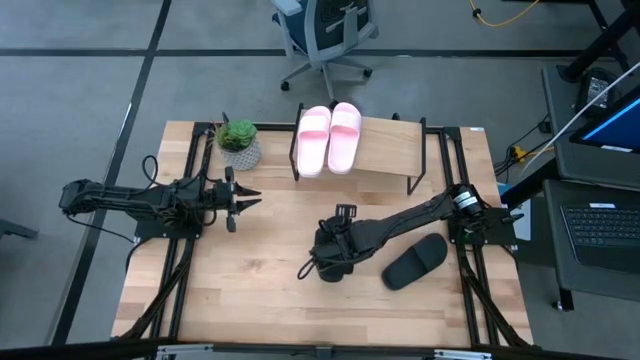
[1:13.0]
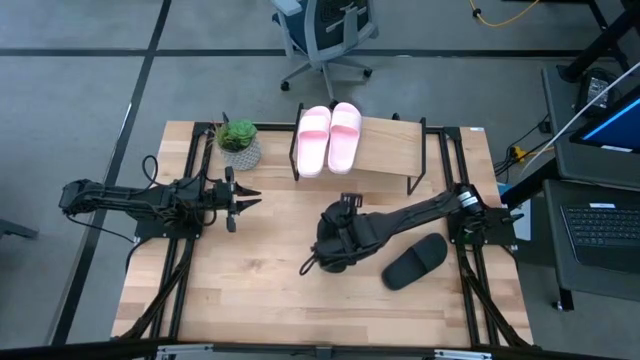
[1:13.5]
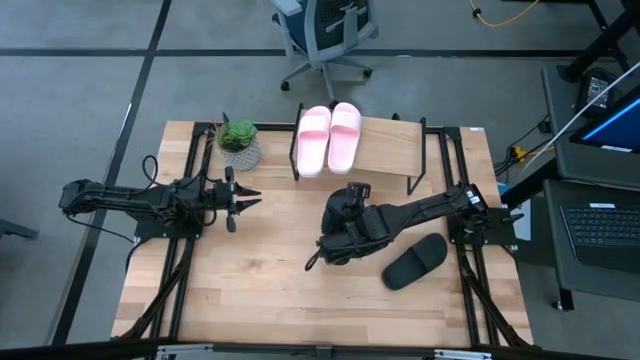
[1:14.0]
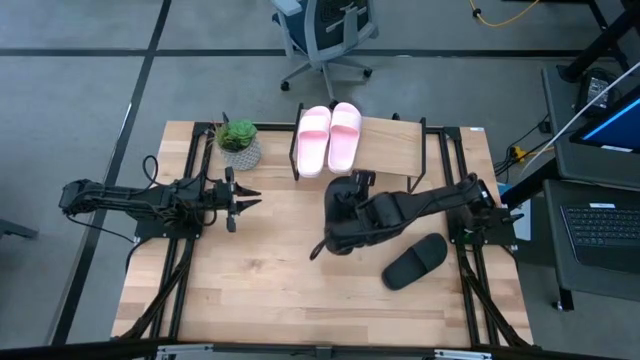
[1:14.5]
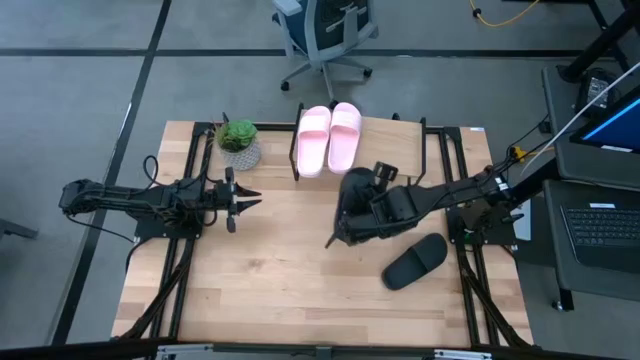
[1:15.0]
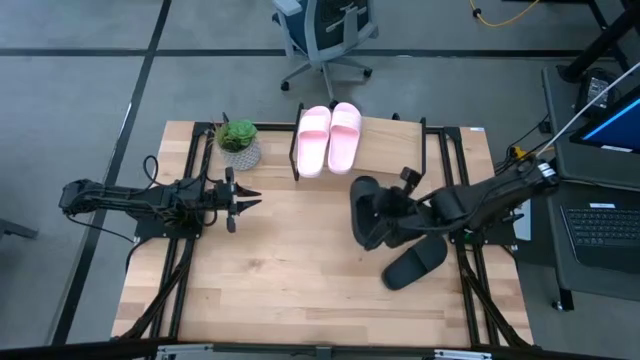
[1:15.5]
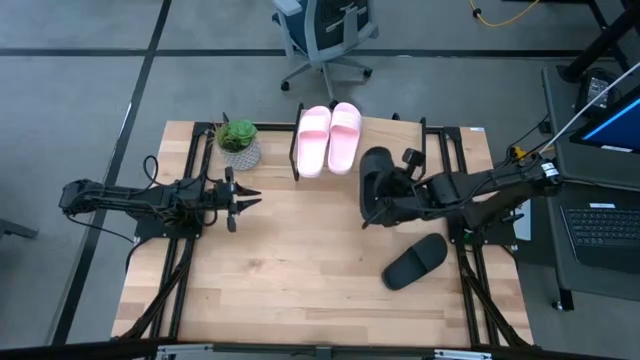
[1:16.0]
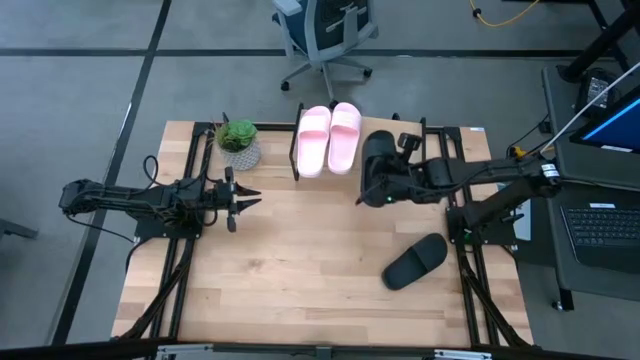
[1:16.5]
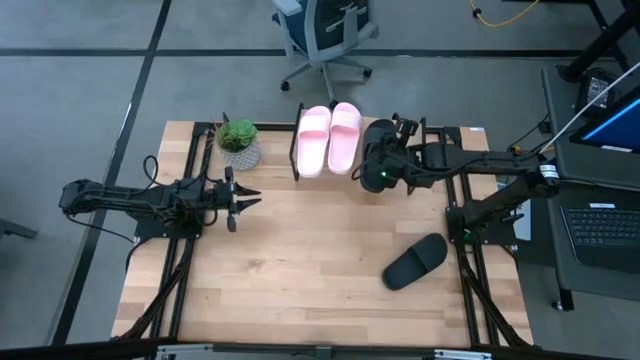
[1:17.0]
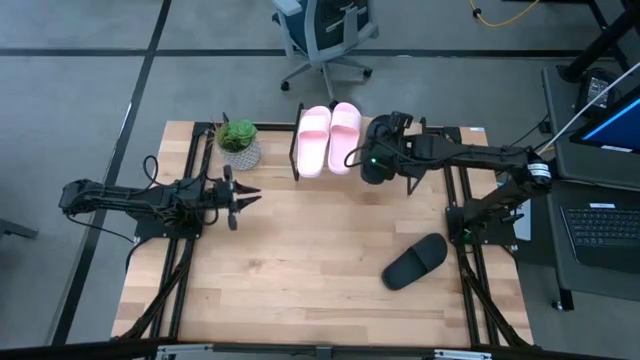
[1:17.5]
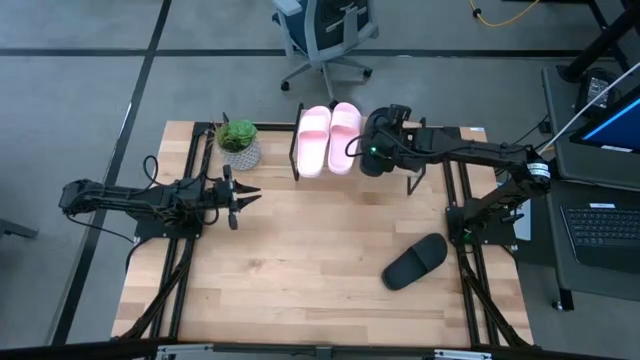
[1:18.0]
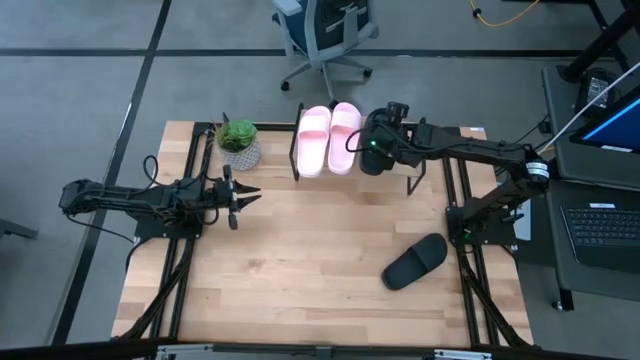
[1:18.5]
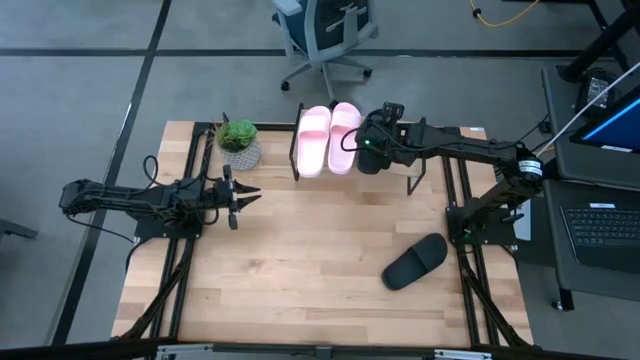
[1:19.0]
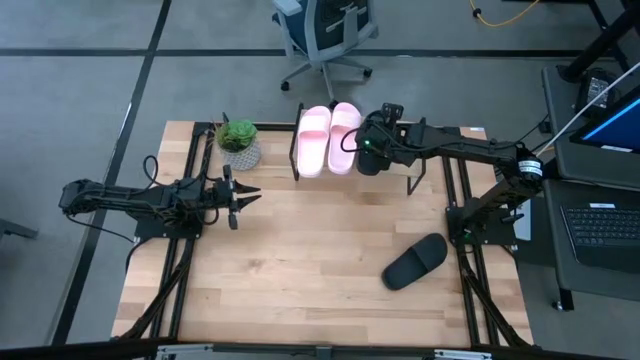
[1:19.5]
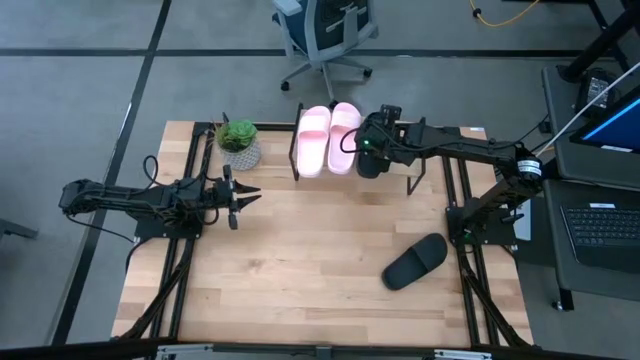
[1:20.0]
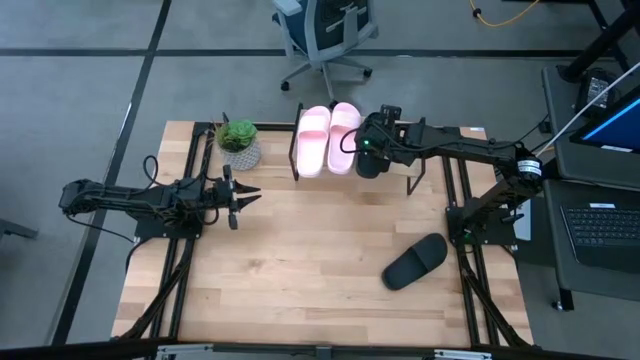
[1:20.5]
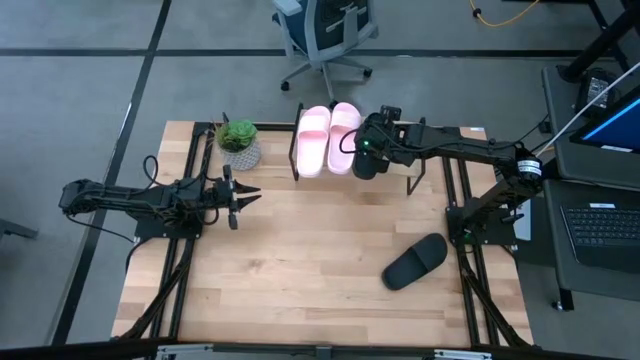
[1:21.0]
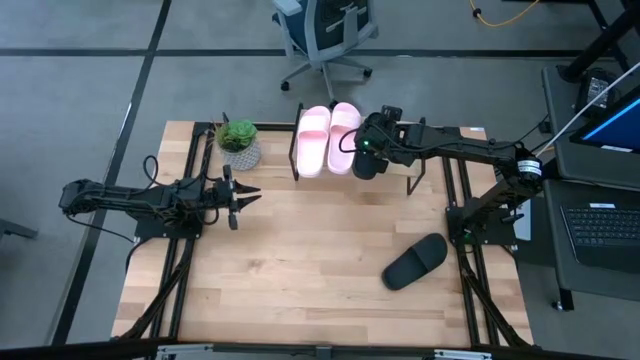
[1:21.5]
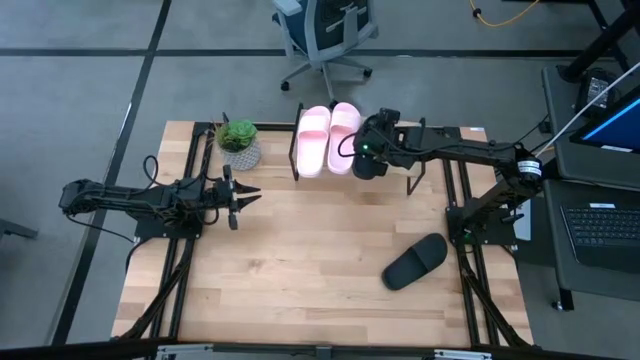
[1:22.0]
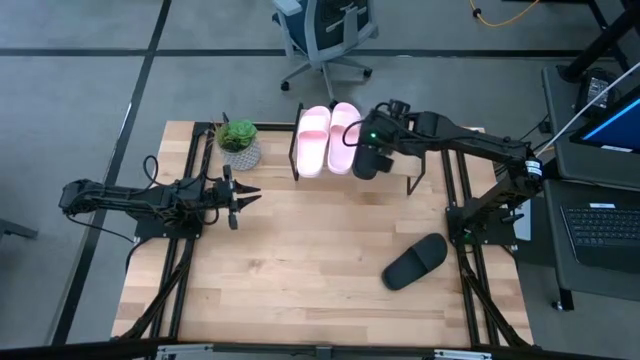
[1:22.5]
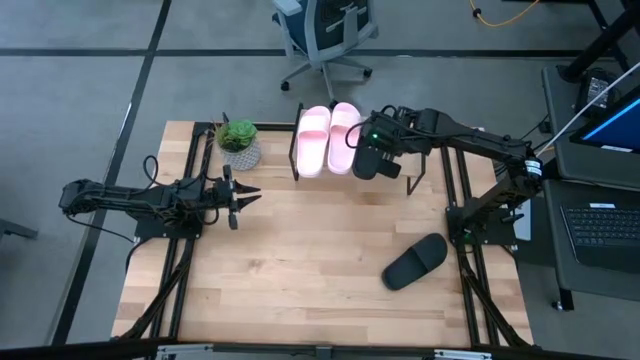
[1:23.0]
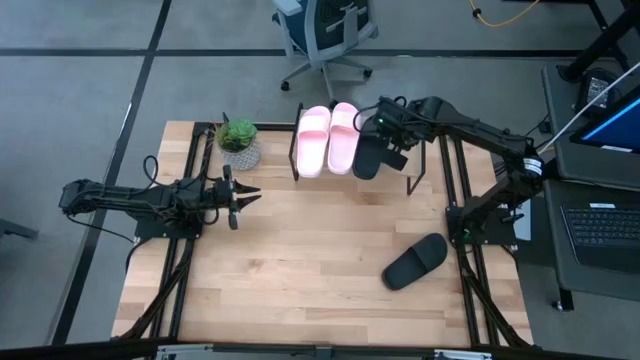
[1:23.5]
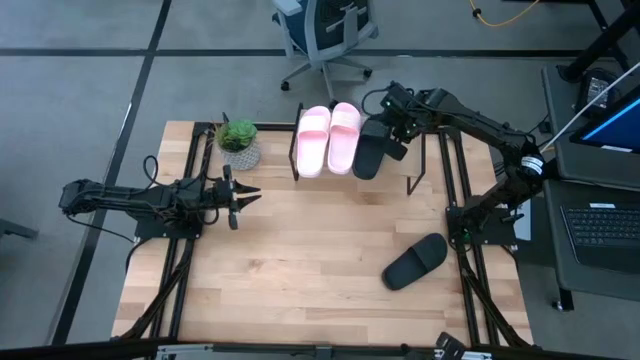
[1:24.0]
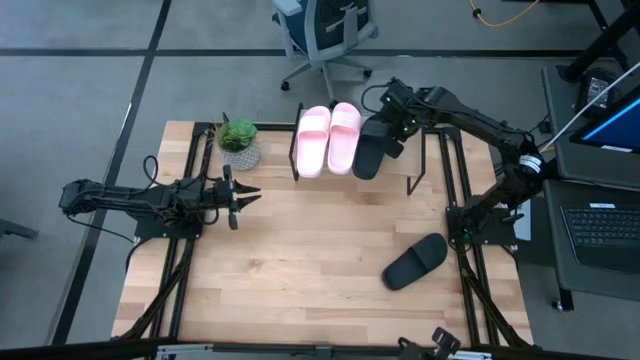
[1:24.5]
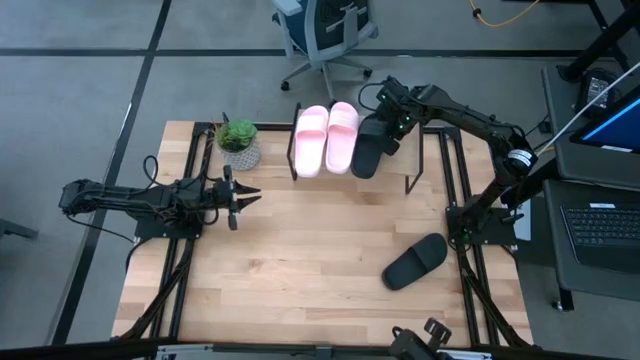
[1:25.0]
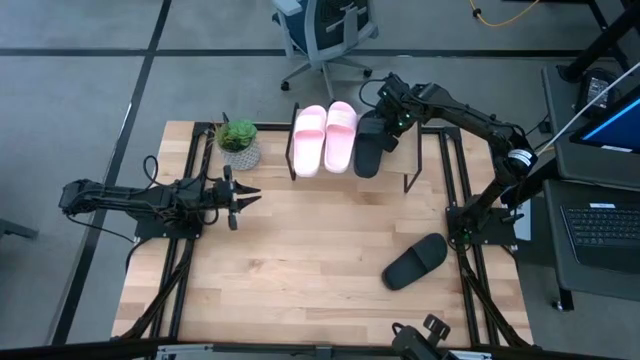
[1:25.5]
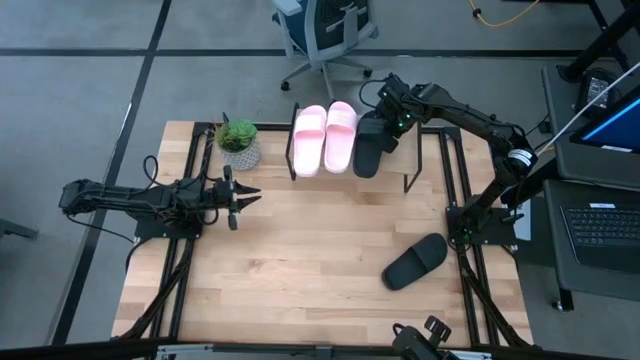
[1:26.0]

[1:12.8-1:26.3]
Task: Pick and place slides into the shelf
Put the left black slide on the shelf

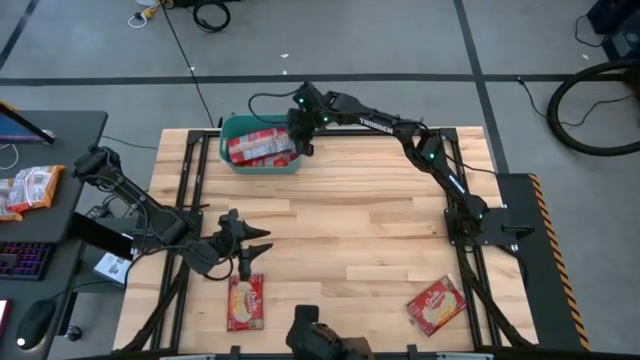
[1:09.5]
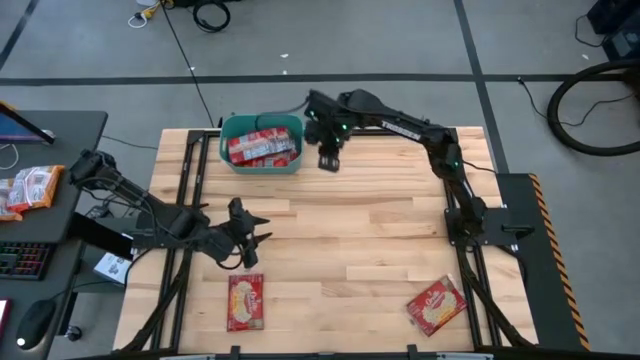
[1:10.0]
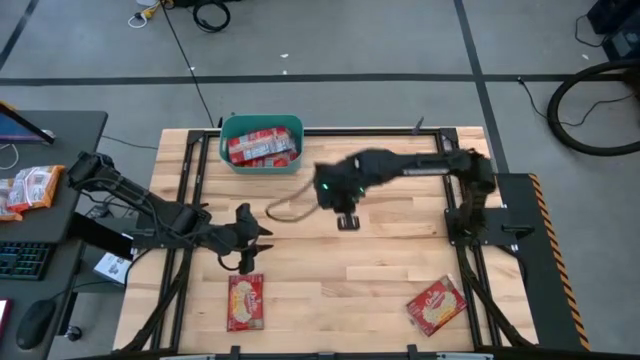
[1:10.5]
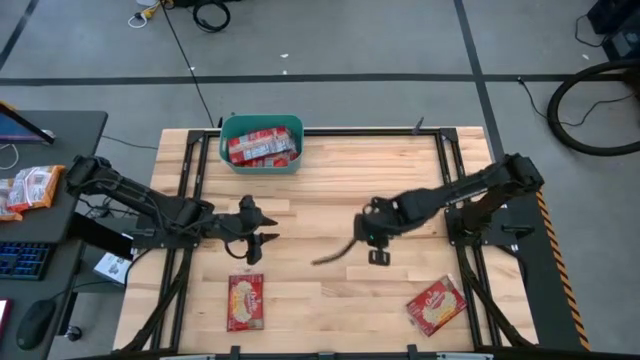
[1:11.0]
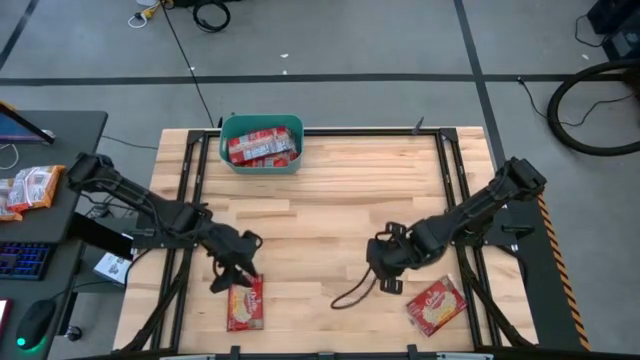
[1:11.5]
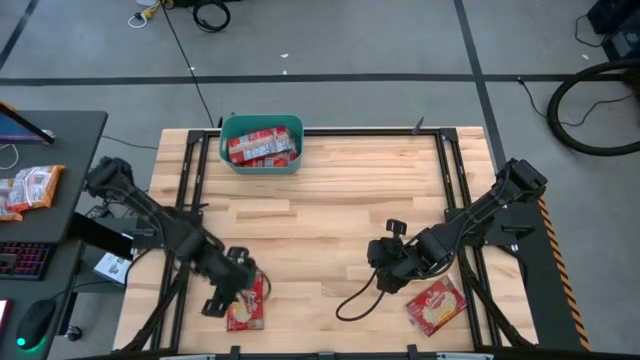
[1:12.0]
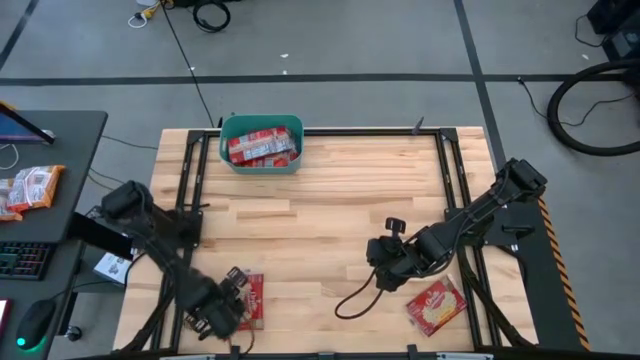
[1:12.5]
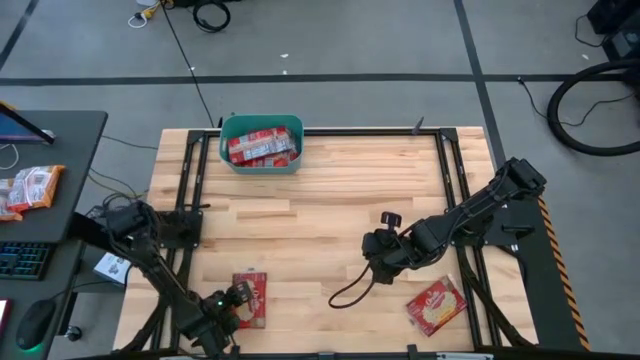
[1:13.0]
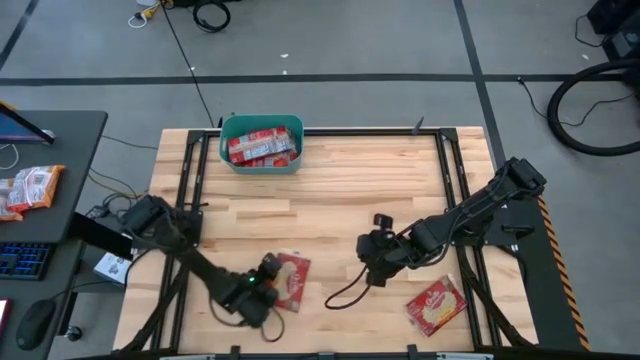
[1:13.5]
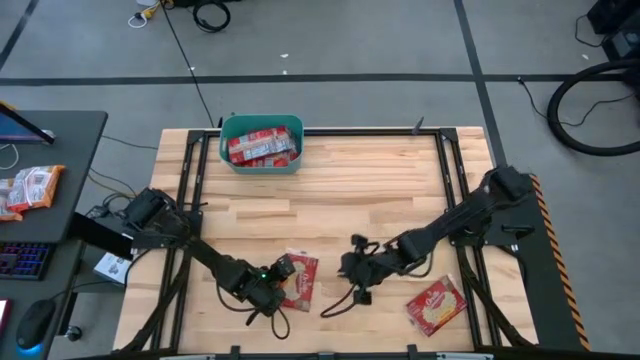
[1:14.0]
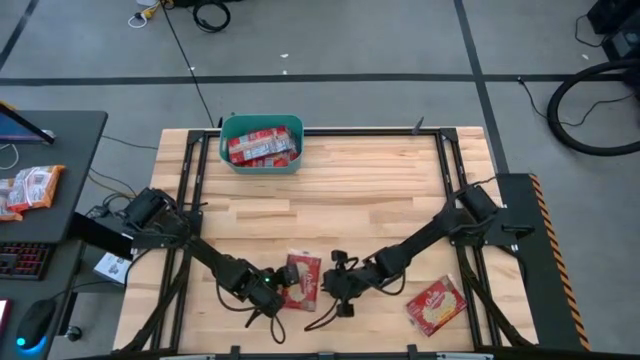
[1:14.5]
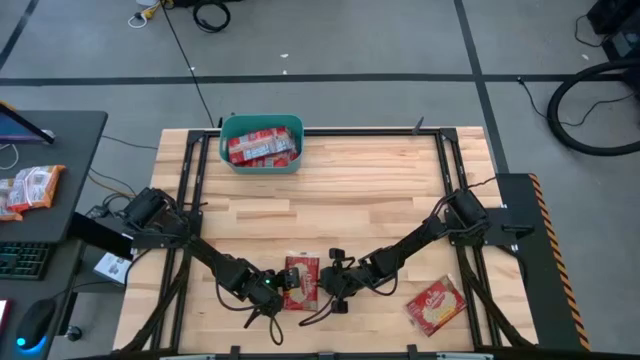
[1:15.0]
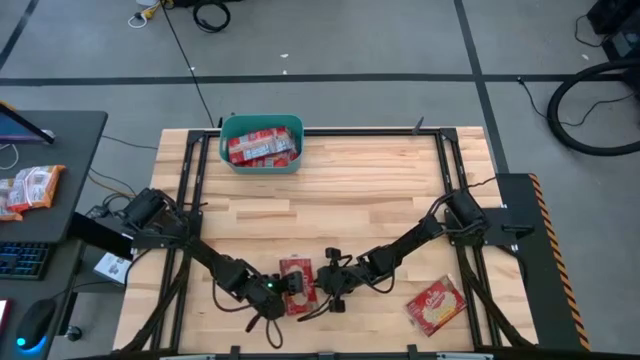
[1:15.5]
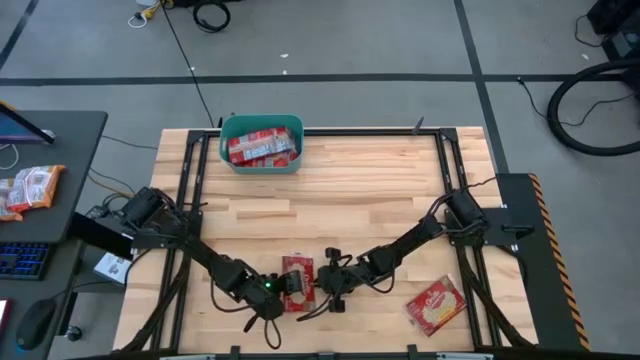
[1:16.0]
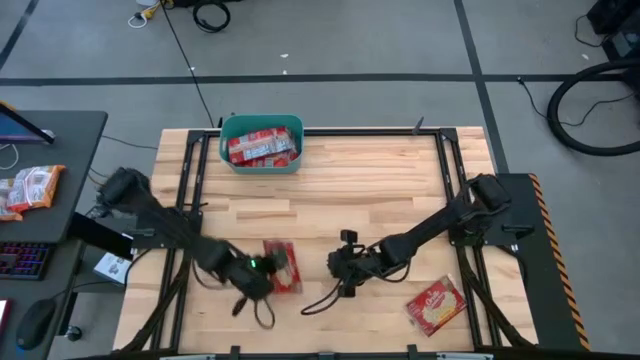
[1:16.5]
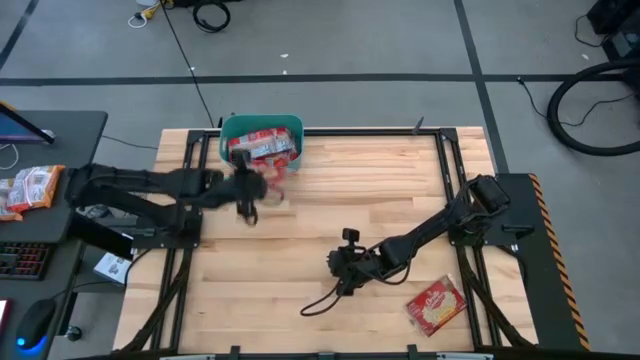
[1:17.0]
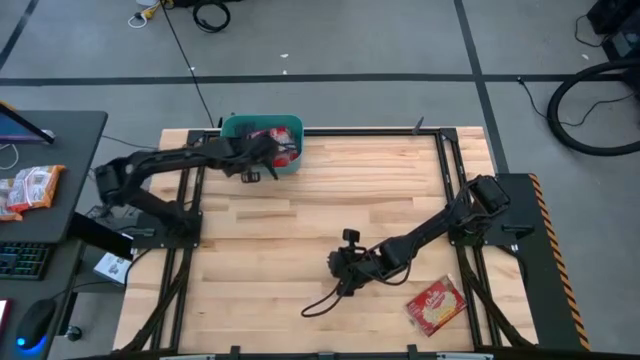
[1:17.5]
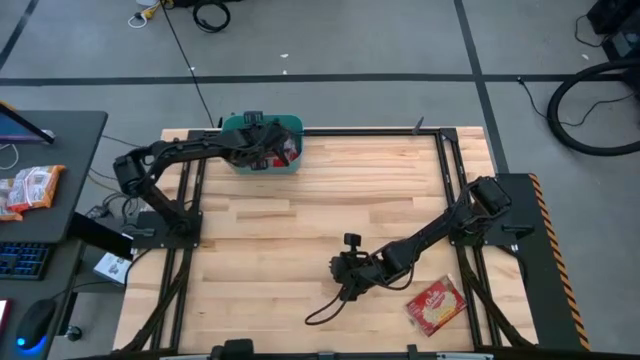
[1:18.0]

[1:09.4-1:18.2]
Task: Sort popcorn bags into baskets
Put the left popcorn bag into the blue bin
